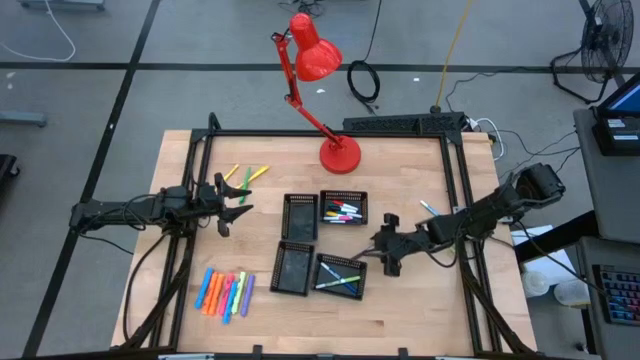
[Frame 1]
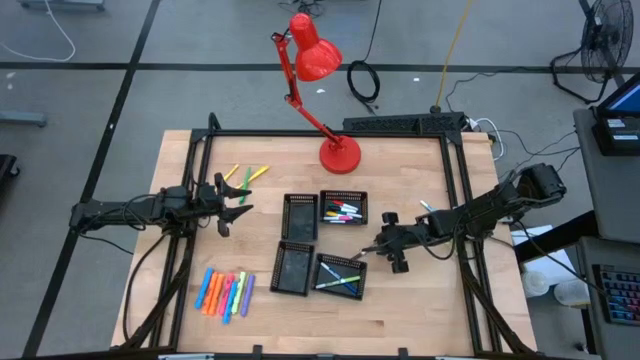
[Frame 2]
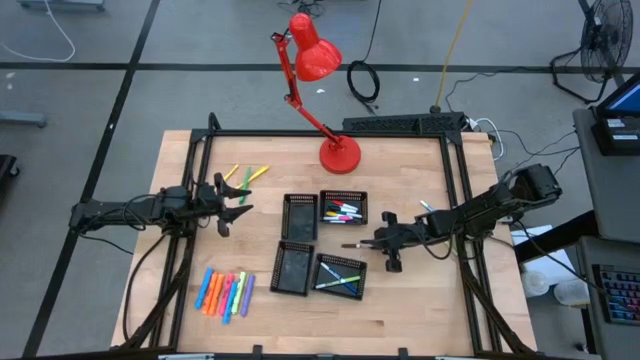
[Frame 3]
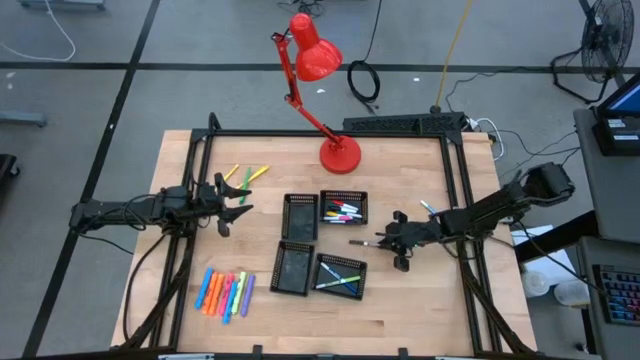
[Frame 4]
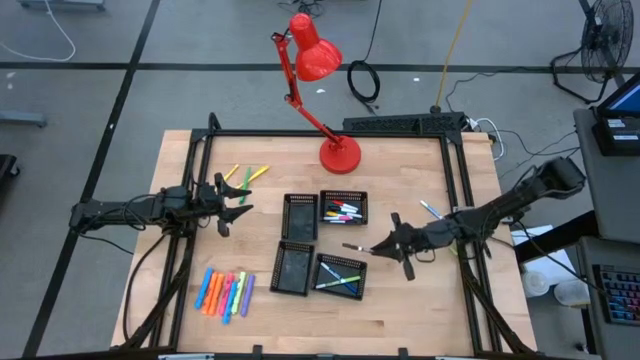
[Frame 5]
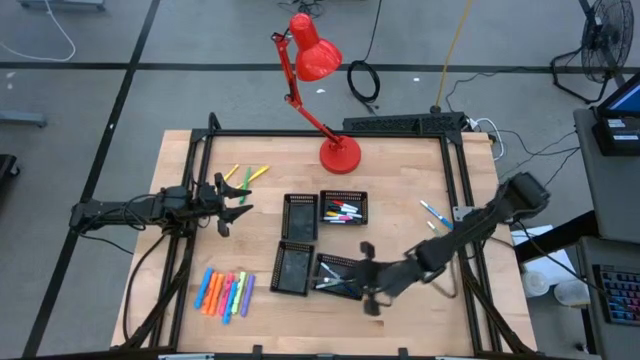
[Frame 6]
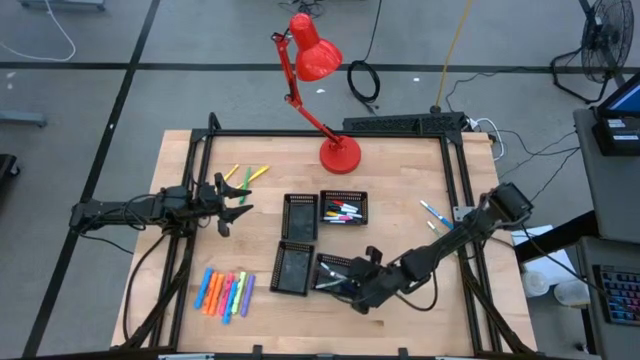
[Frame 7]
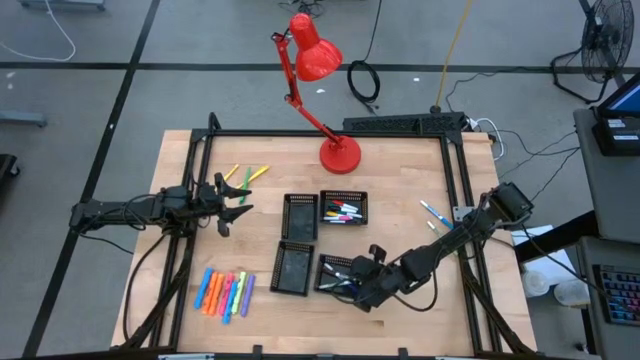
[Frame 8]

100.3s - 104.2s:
Task: Pick & Place Markers
Put the brown marker pen into the bottom right black bin

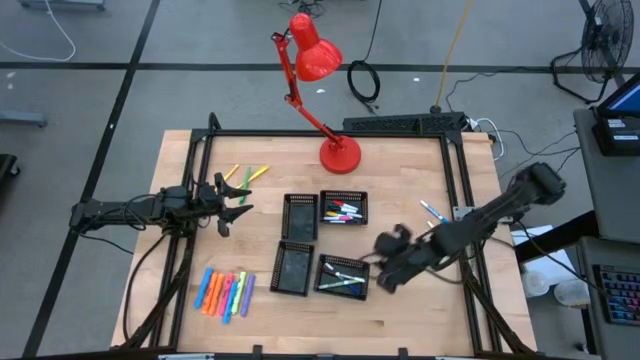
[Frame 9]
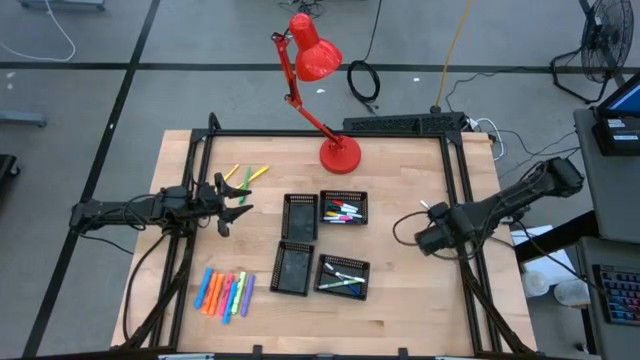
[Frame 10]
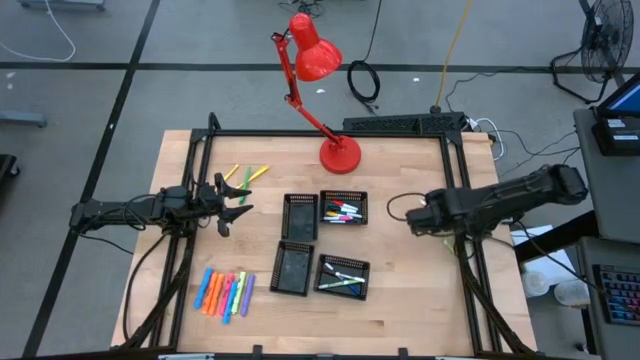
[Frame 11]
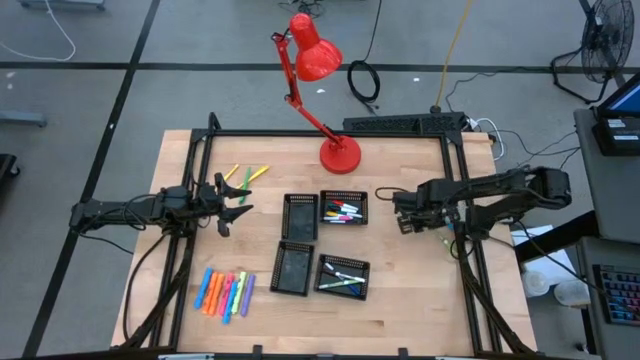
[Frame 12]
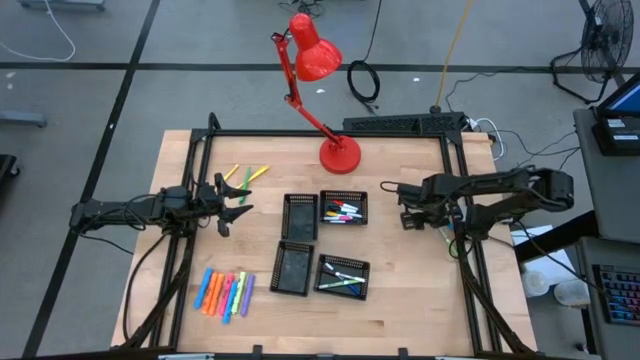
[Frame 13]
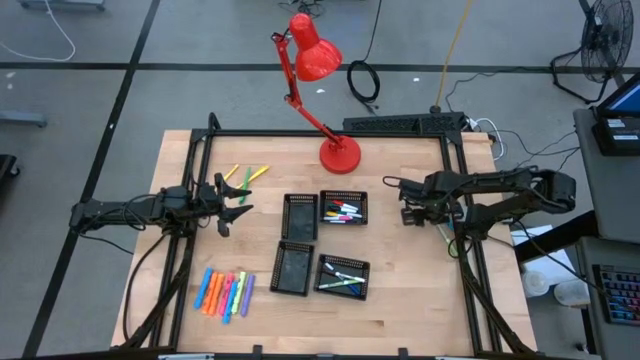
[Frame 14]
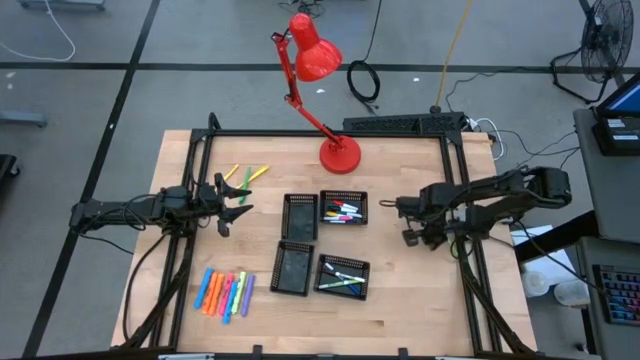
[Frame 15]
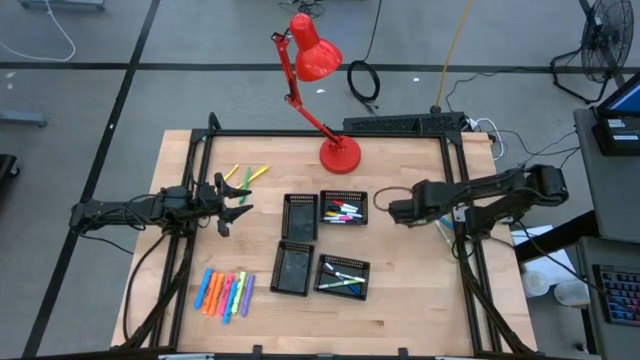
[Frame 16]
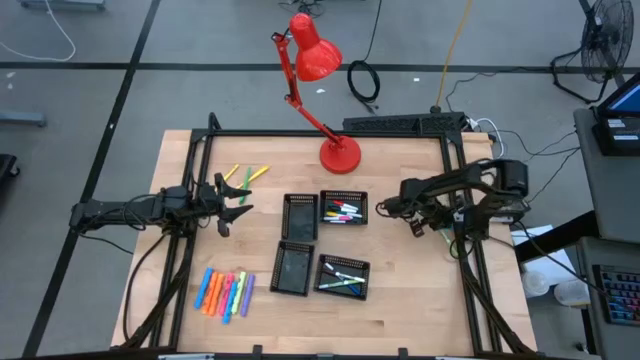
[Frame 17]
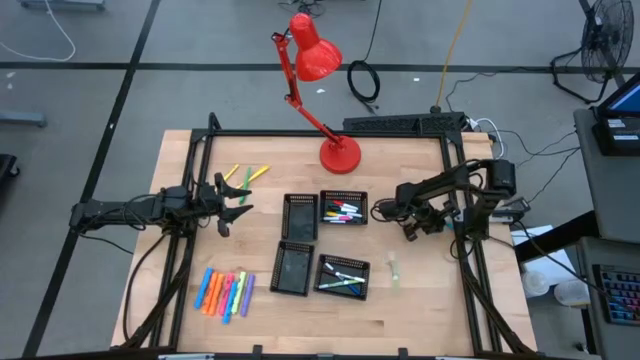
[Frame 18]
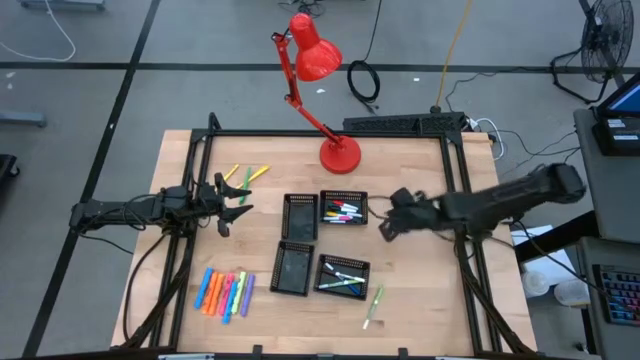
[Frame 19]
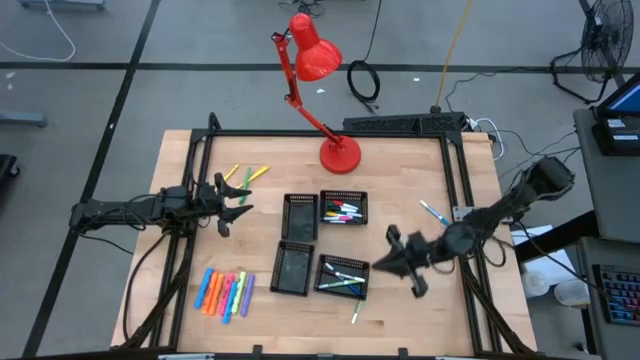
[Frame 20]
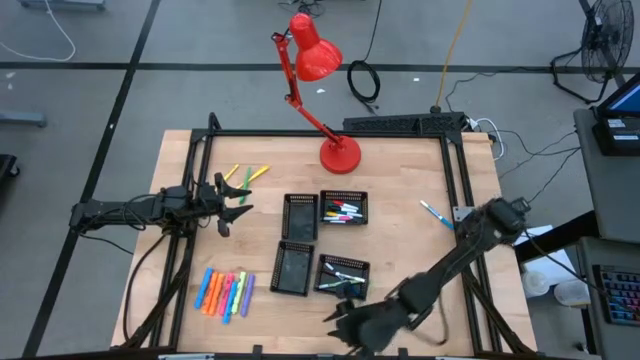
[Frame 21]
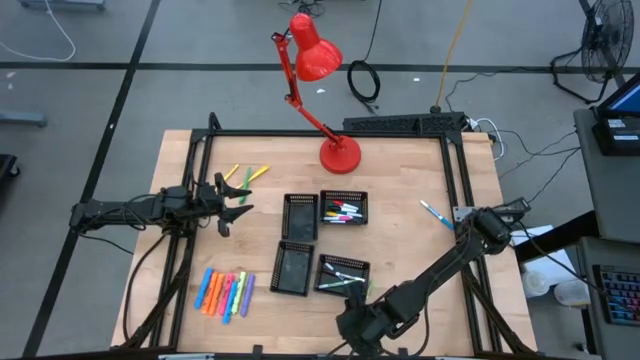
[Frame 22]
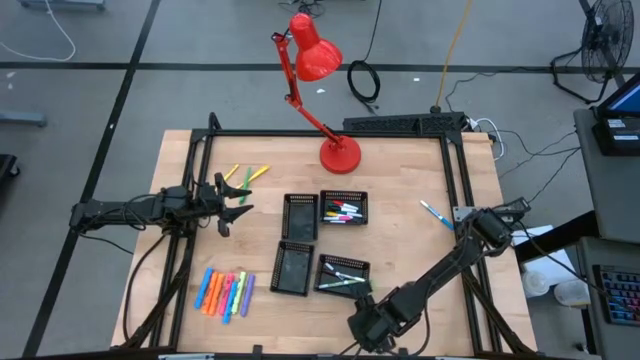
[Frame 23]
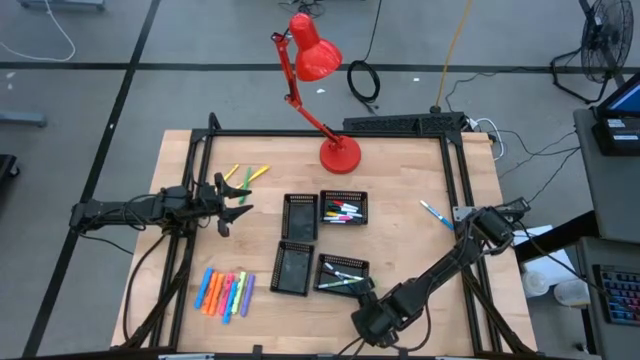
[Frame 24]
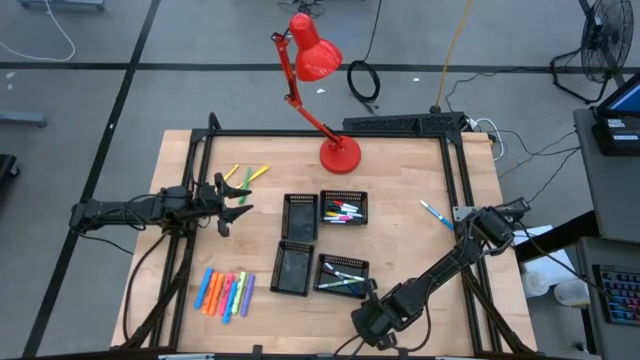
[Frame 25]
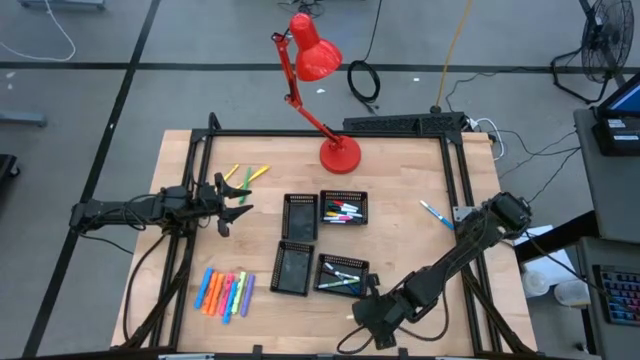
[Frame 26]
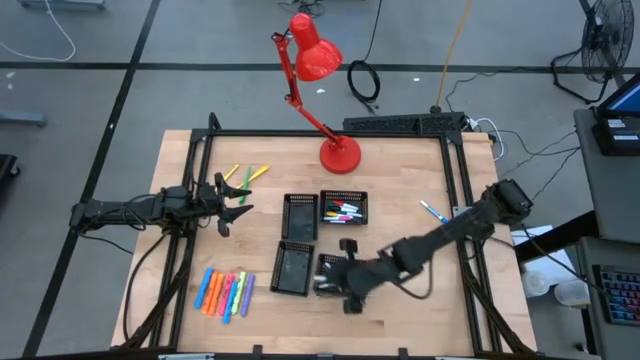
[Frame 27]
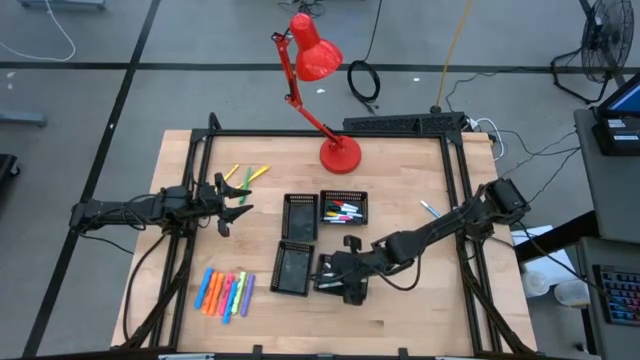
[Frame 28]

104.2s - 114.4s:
Put the green marker pen into the bottom right black bin

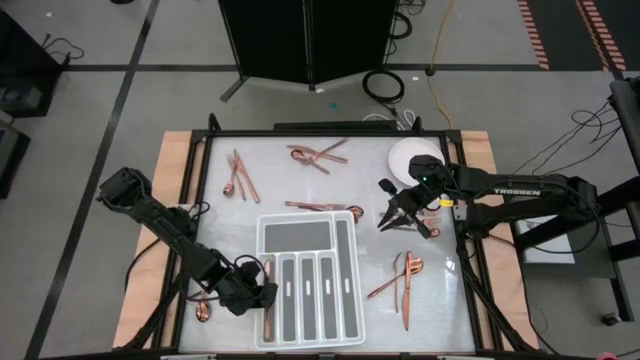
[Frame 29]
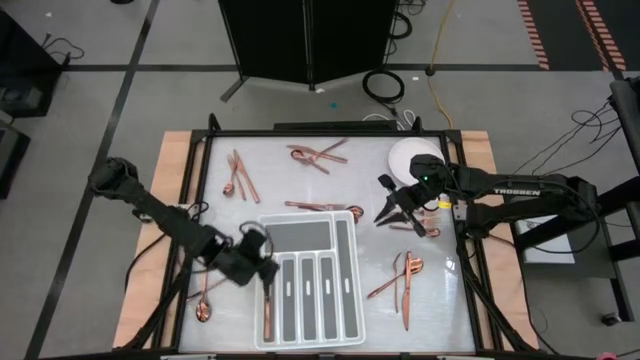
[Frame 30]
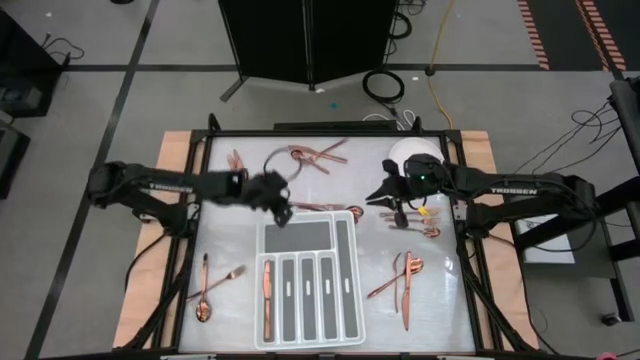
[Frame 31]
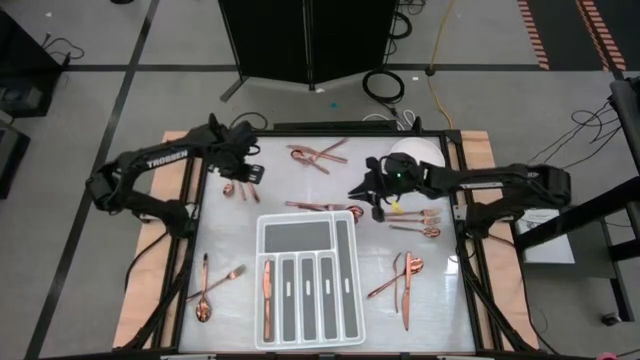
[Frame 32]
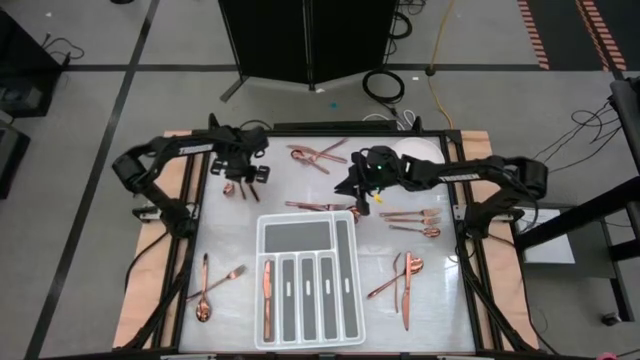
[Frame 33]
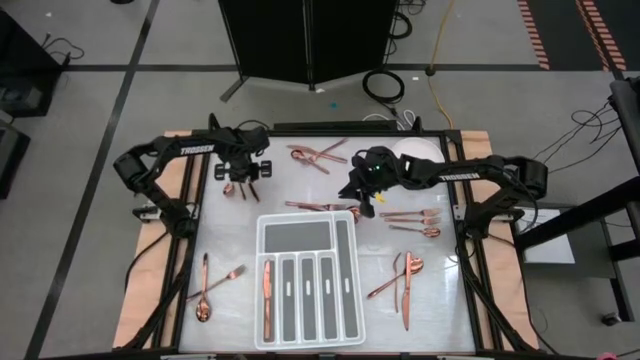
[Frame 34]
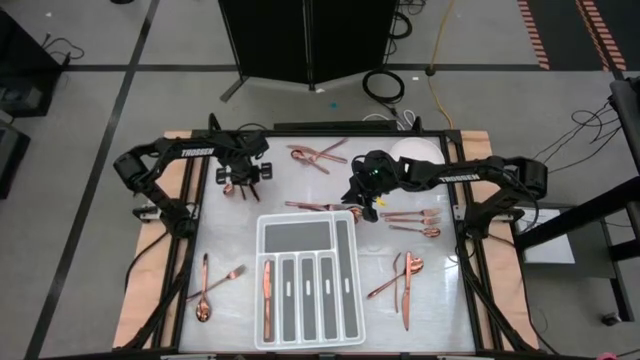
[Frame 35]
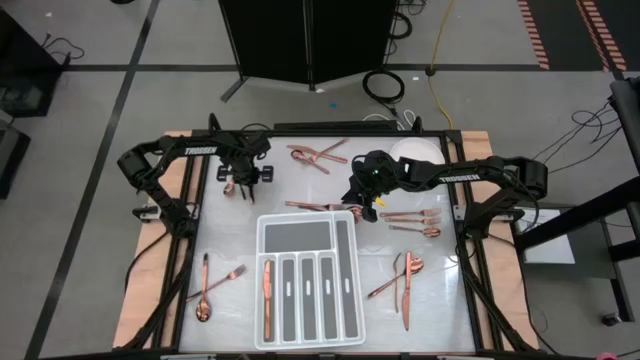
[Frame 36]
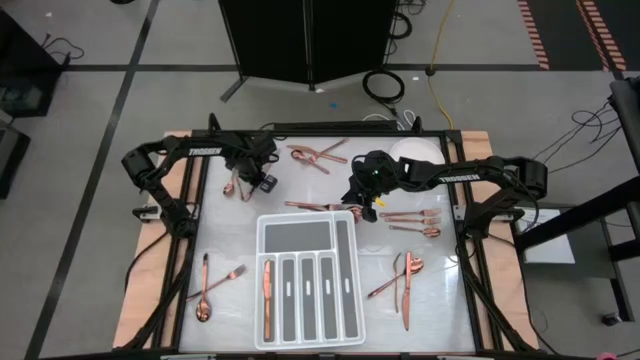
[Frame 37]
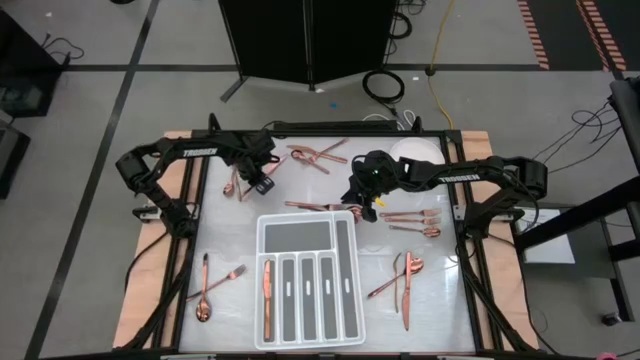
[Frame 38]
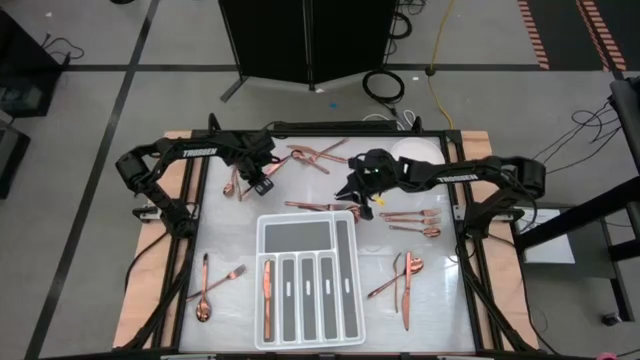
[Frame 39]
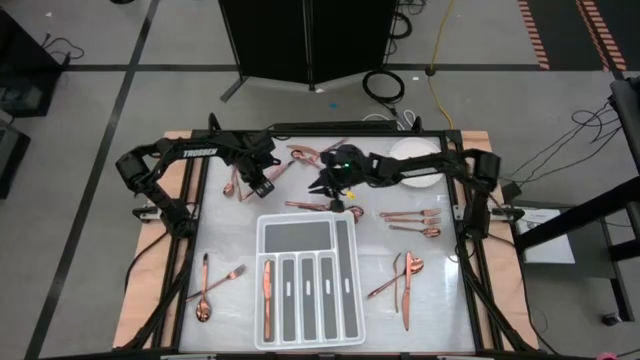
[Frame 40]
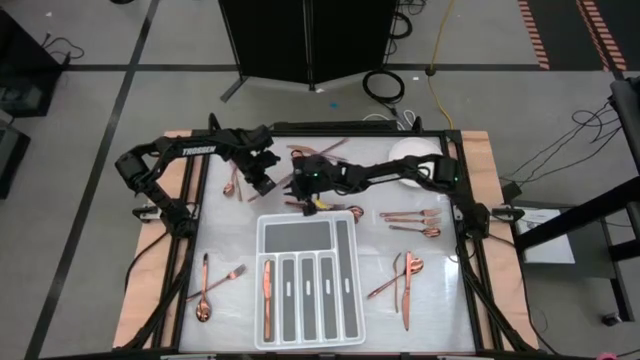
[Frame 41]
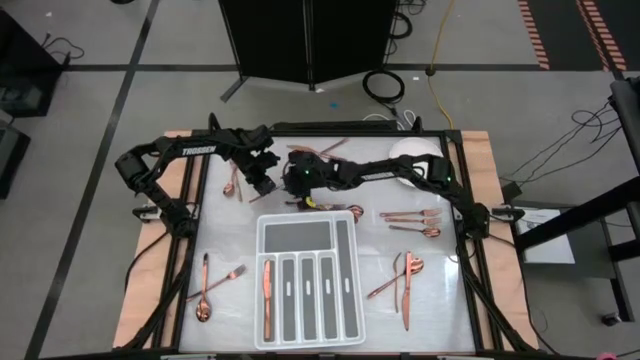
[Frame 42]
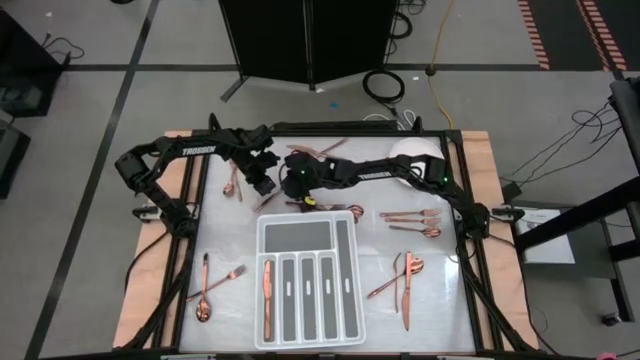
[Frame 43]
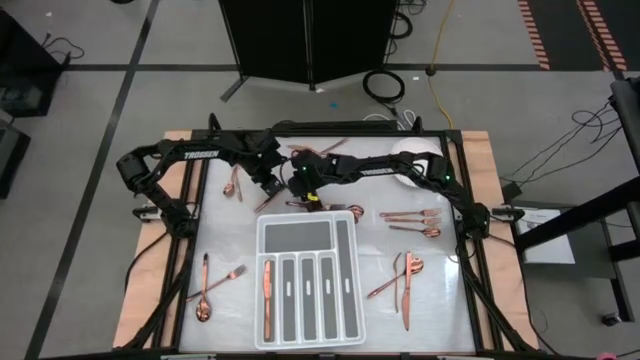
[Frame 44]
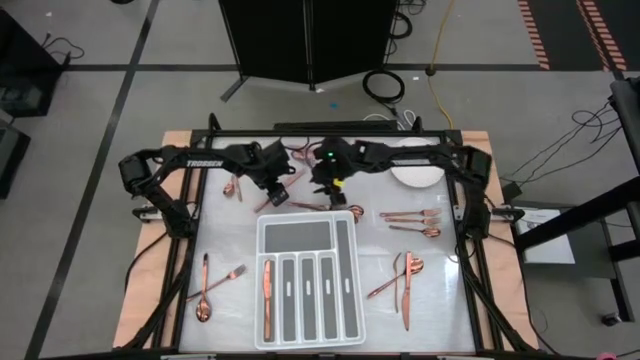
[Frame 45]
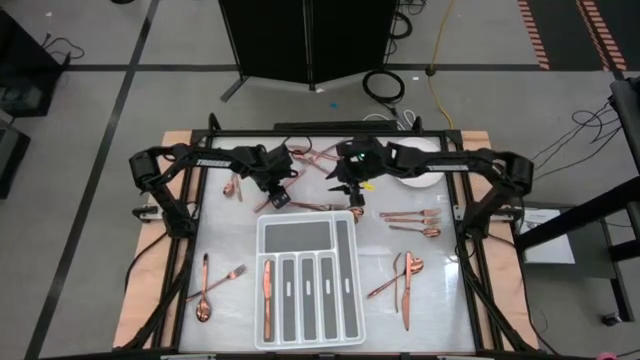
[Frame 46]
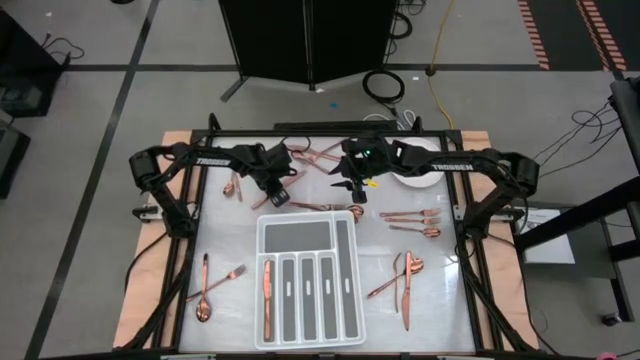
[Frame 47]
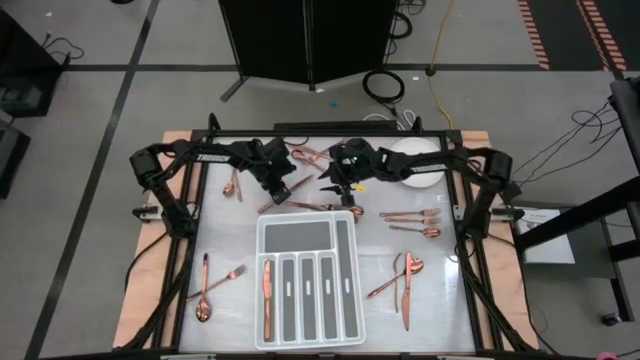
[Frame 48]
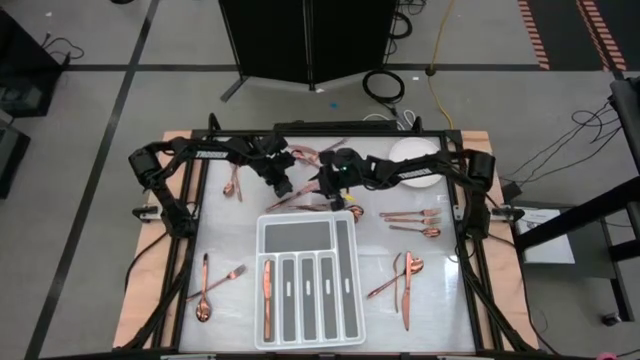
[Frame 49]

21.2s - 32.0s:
Task: Sort silverware
Put the top left knife into the silverware tray
